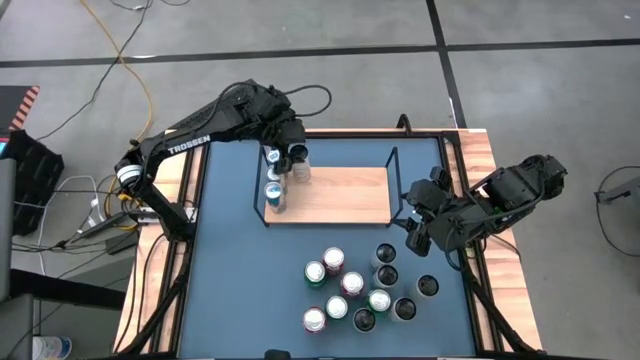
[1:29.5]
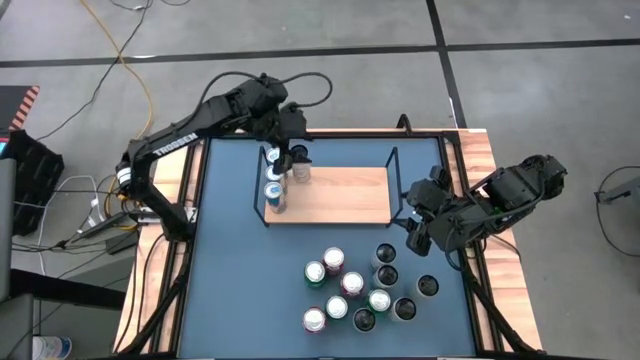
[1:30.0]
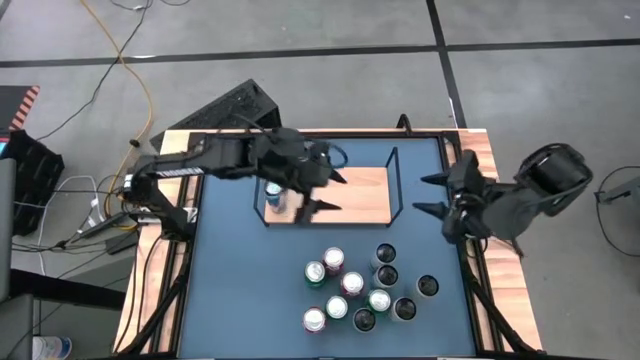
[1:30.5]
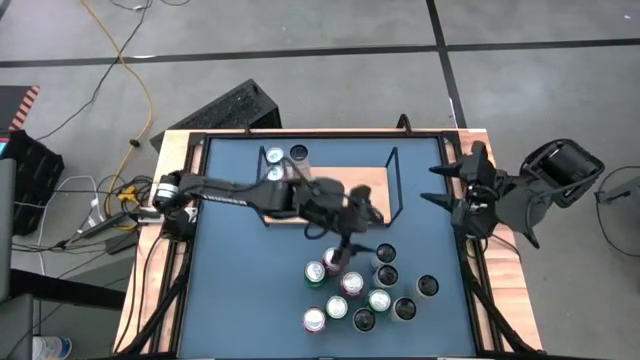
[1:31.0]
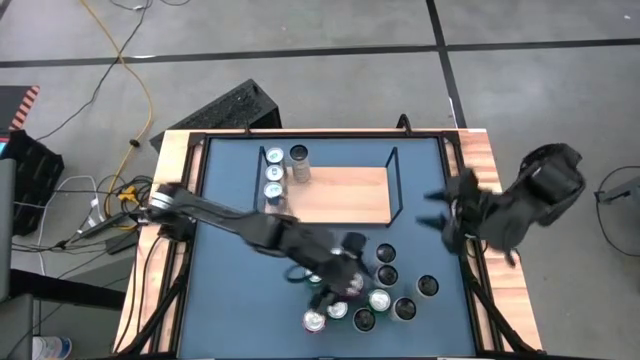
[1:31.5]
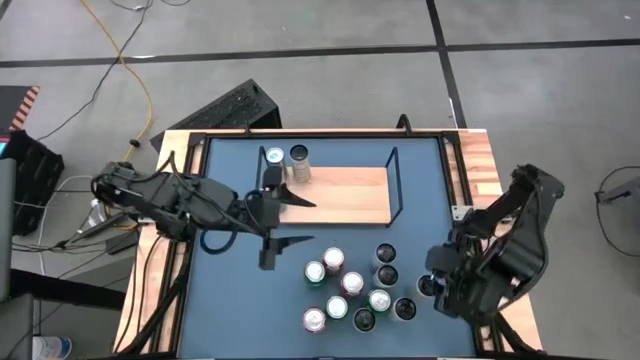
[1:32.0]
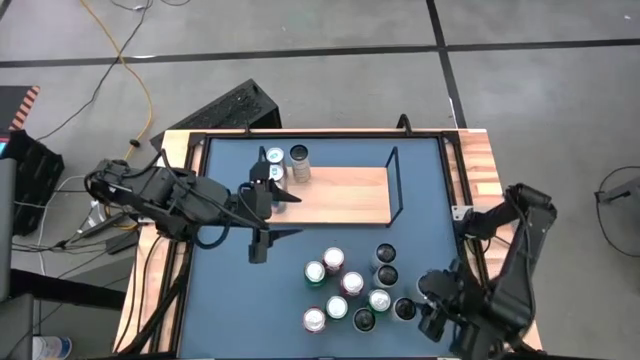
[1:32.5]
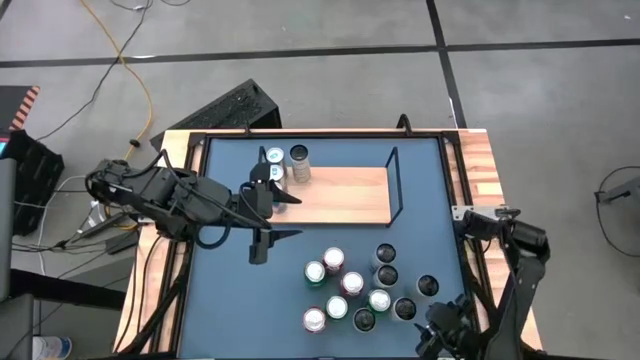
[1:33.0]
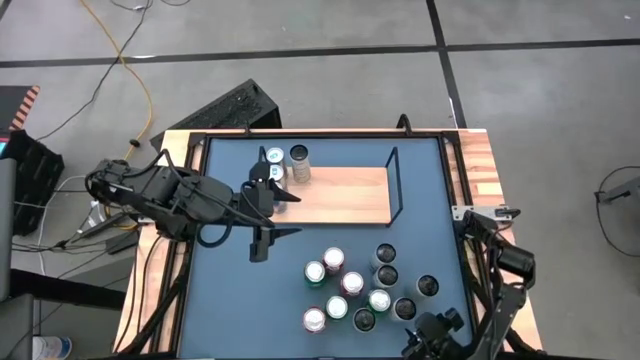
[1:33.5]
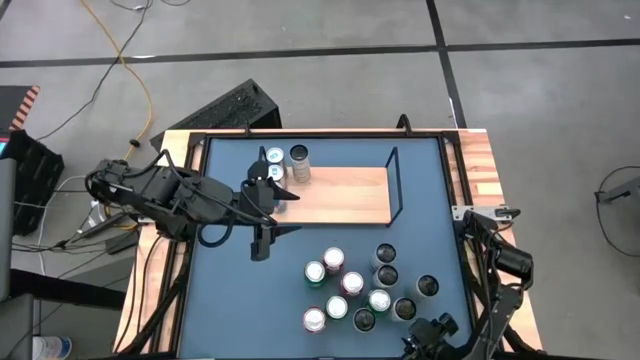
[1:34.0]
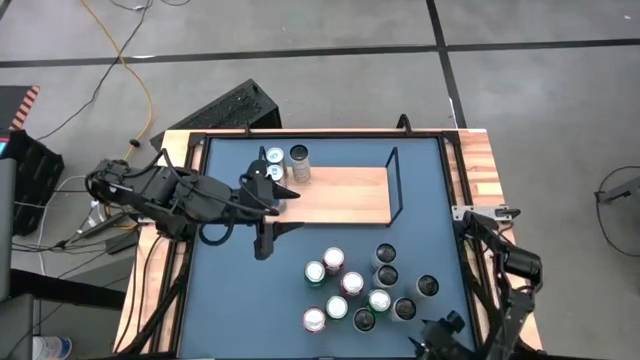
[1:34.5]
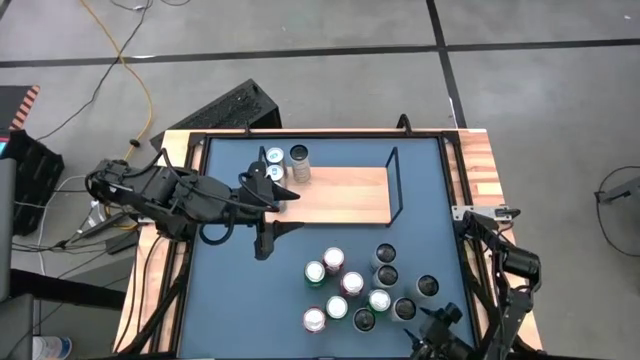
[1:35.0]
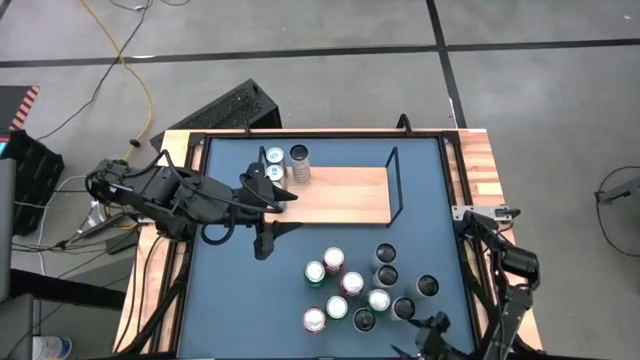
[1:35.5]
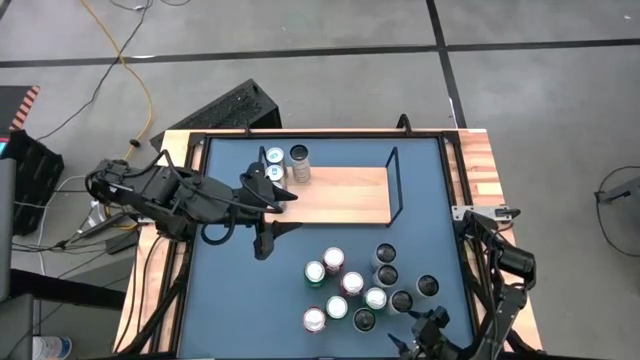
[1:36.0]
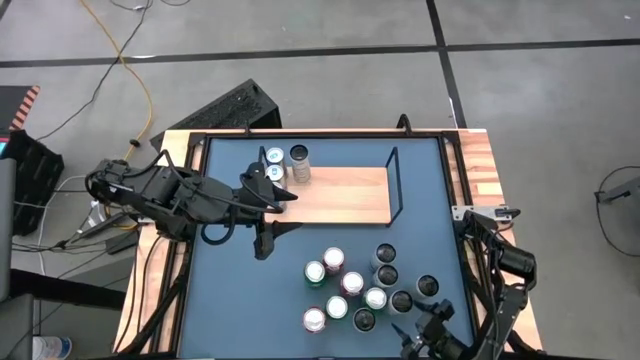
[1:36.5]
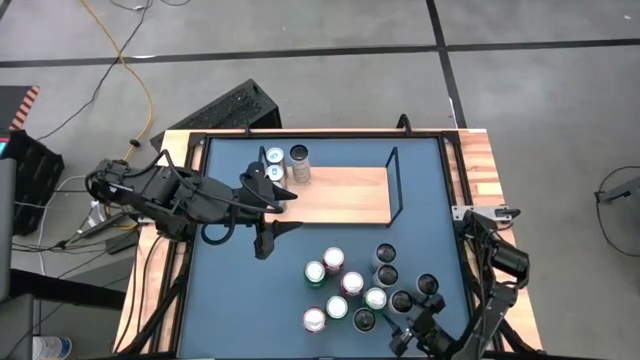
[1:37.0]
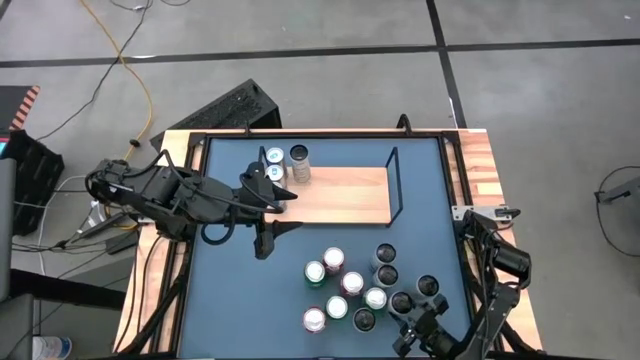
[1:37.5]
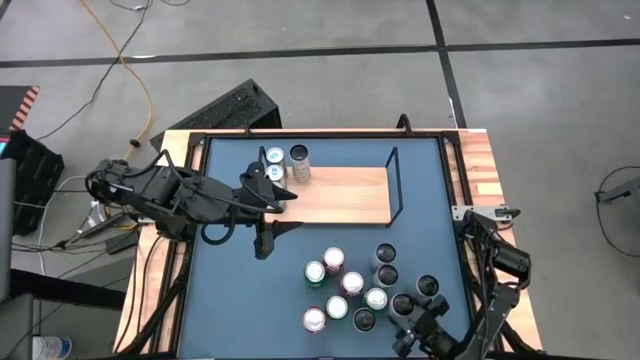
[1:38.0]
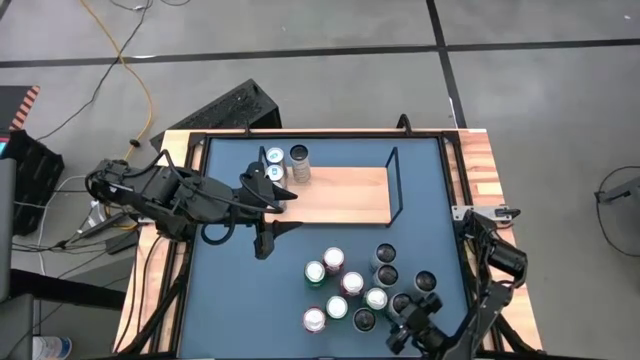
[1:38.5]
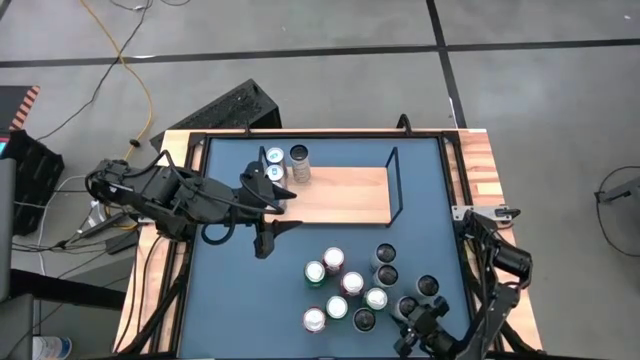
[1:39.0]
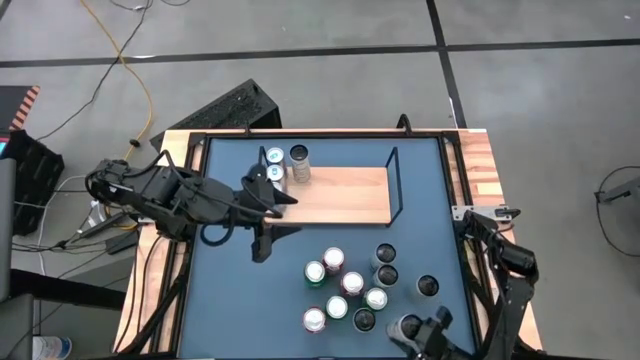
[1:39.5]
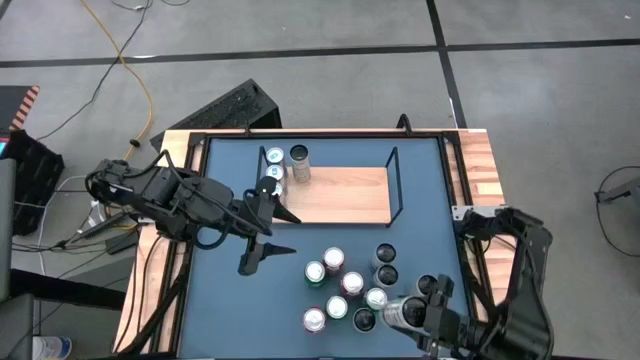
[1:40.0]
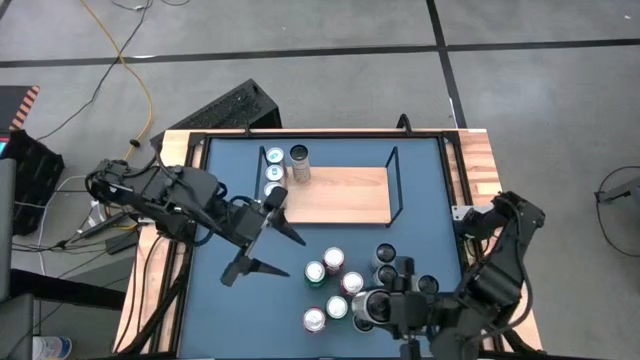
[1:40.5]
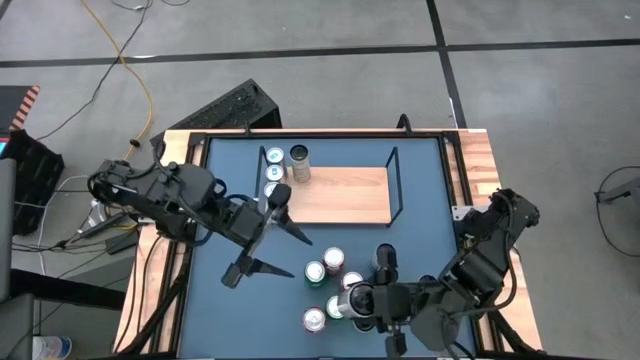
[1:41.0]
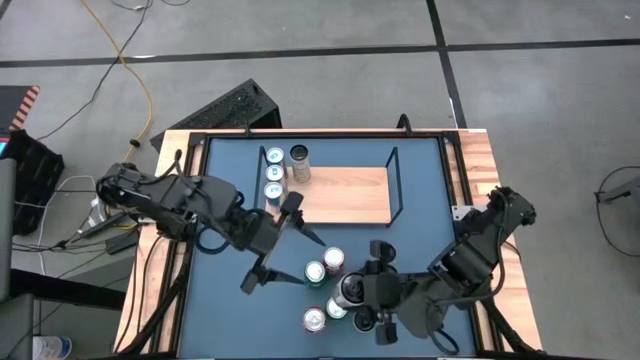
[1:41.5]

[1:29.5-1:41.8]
Task: Place canned beverage on shelf
Put the bottom white and orange soda can on the shelf aligned with the other white and orange soda can
